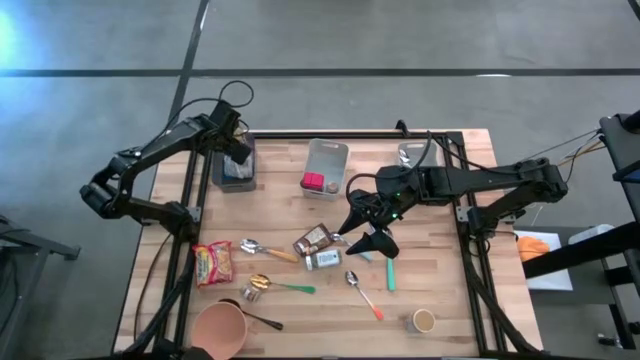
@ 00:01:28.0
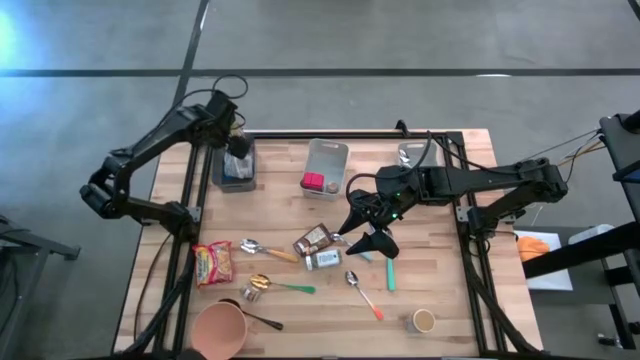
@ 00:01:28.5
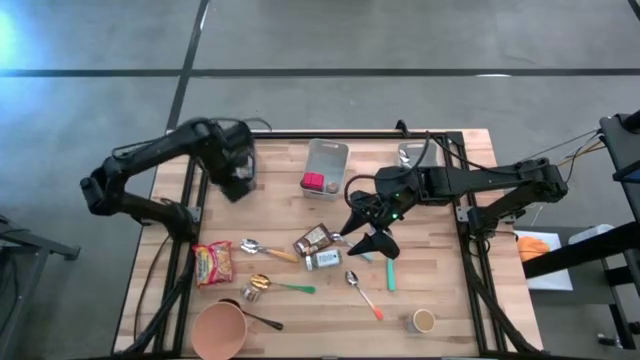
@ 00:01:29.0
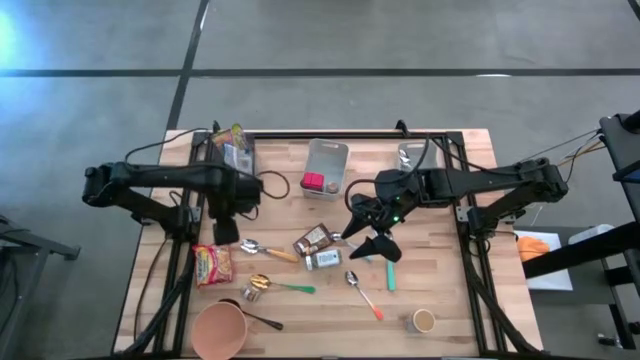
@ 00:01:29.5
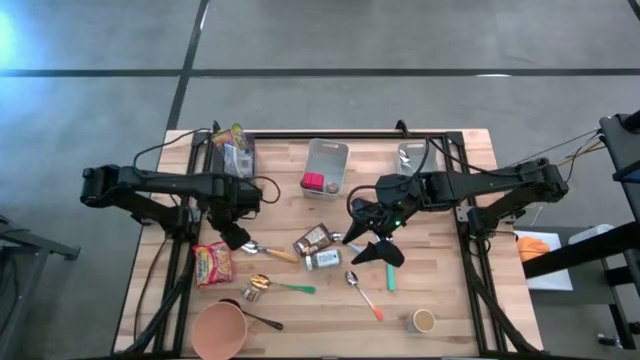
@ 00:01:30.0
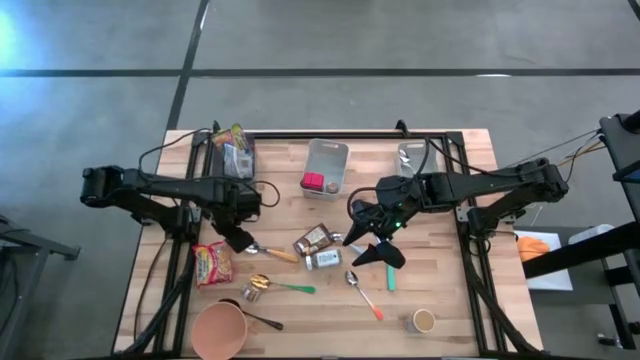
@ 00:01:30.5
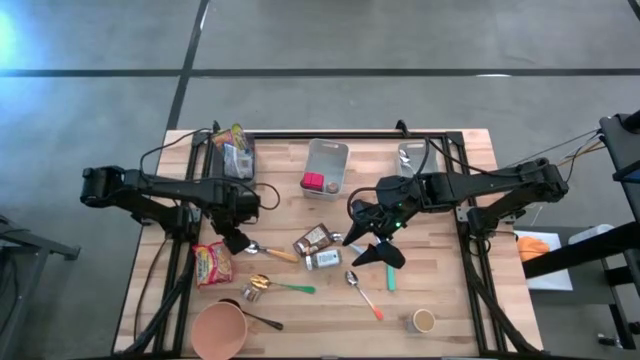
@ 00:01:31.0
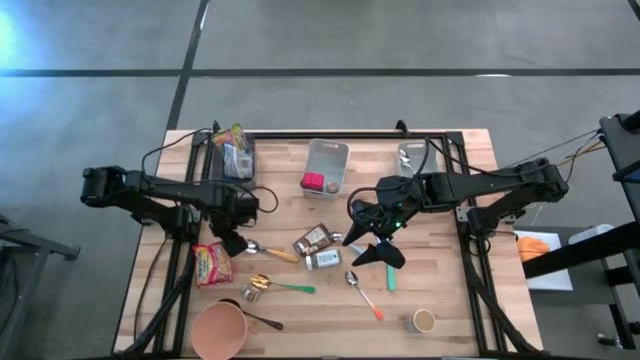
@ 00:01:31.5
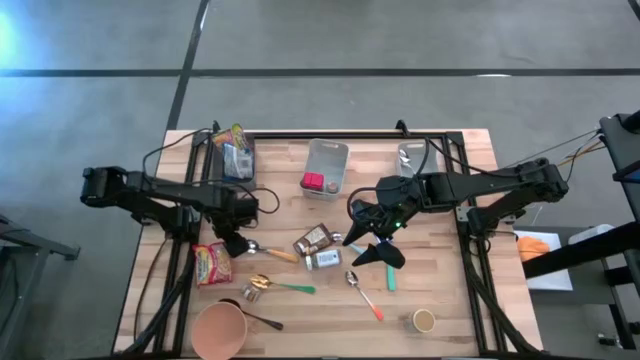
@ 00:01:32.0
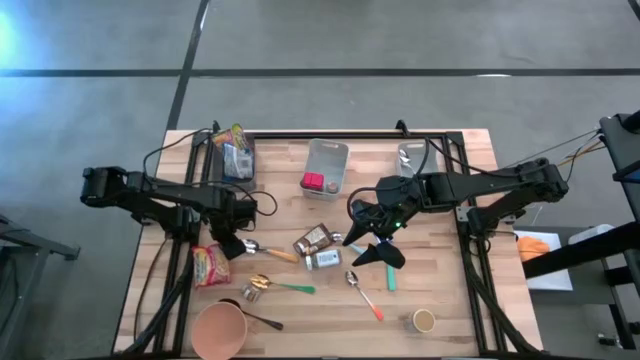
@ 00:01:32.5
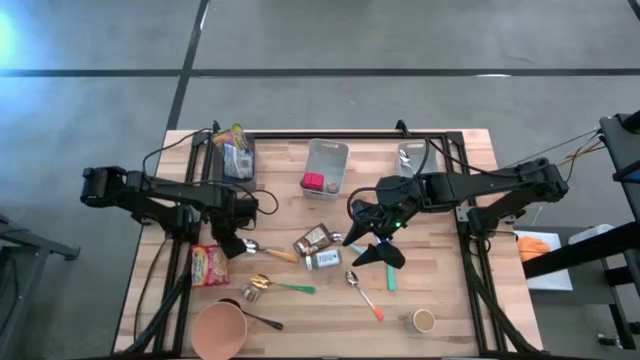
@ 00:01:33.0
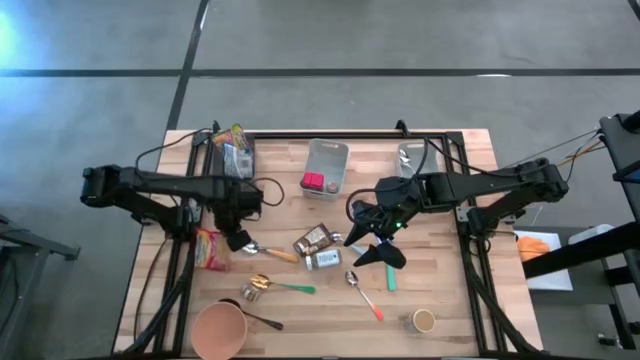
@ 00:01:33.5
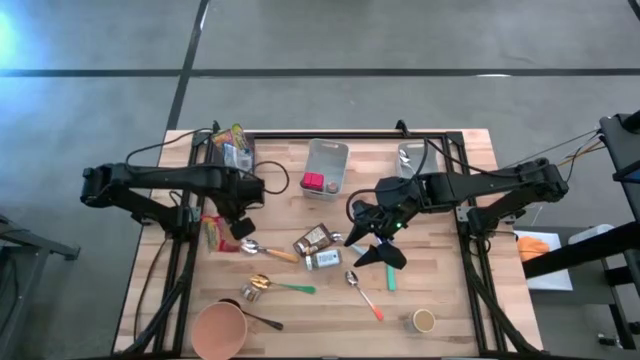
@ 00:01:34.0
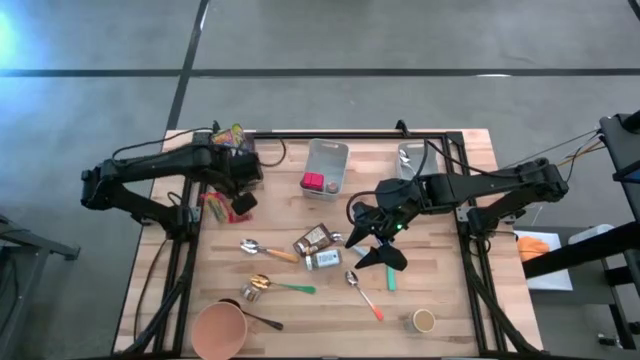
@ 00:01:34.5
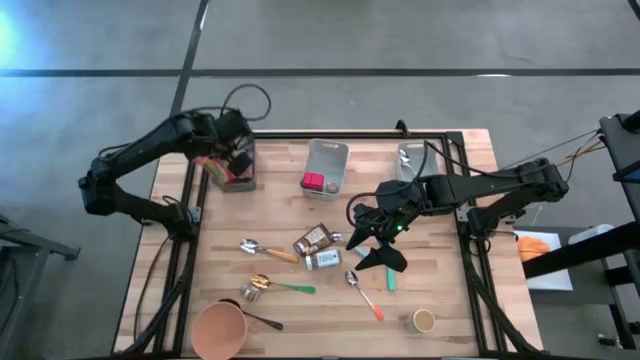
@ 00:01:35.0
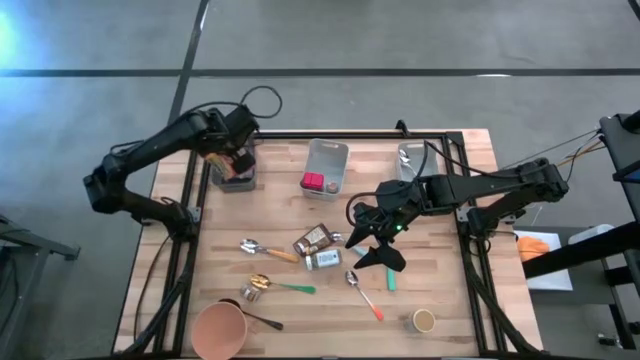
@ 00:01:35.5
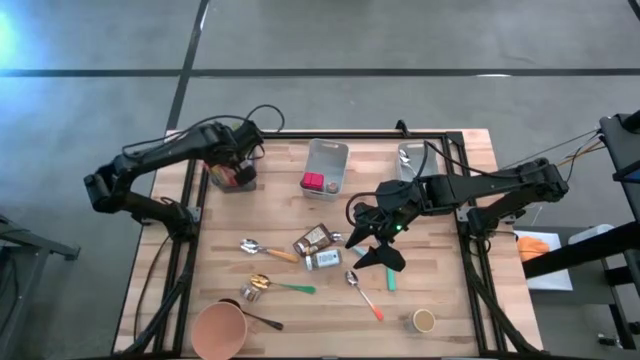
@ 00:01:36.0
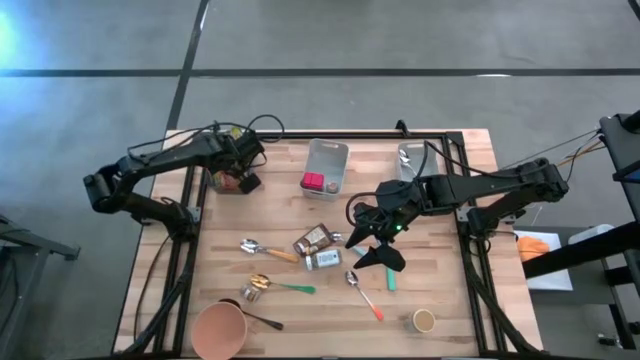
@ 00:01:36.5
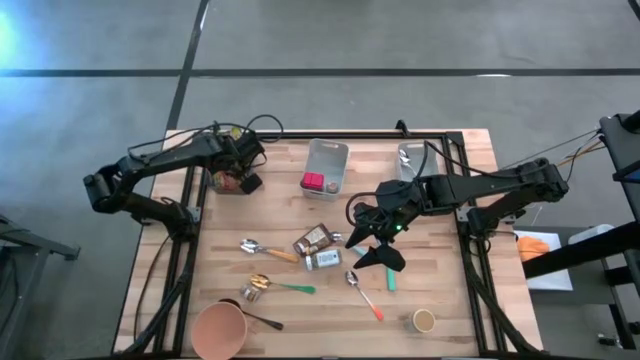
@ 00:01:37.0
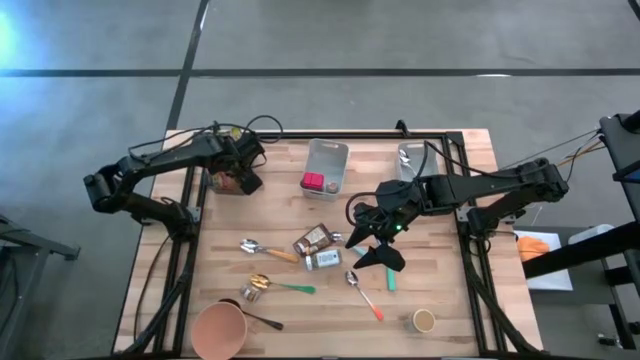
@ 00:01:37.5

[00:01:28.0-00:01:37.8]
Put the red noodle pack into the black bin

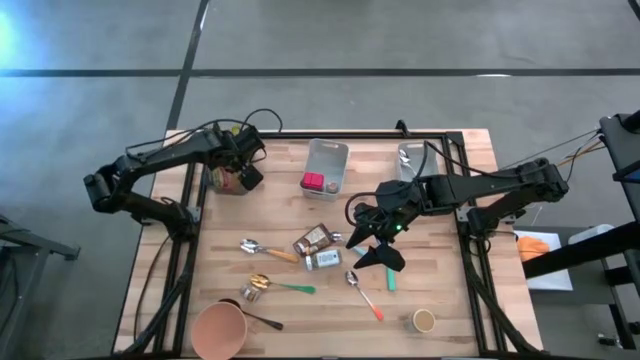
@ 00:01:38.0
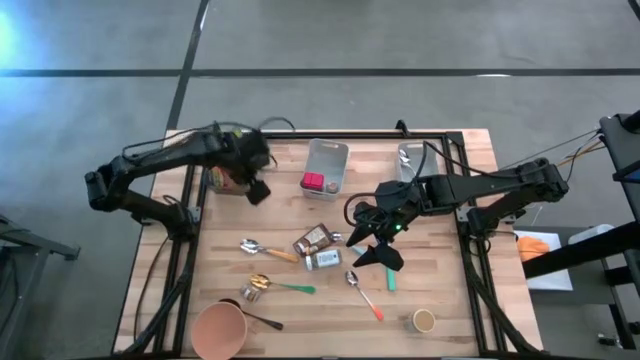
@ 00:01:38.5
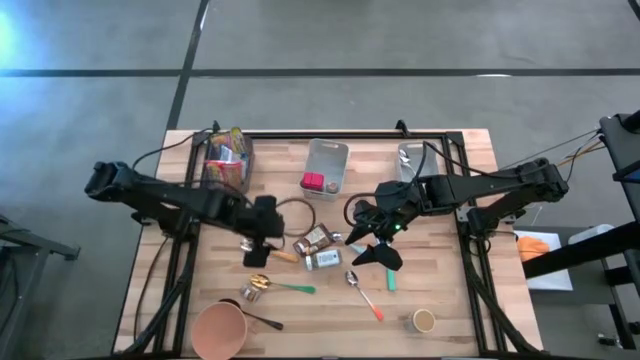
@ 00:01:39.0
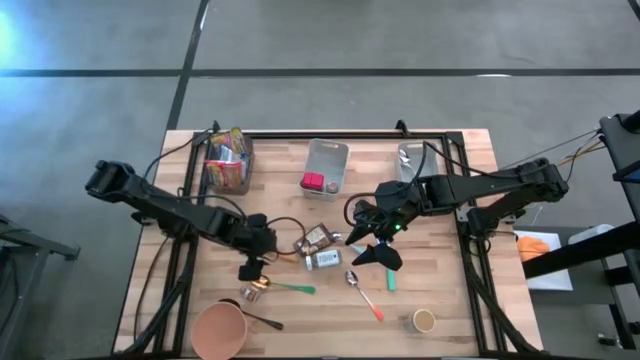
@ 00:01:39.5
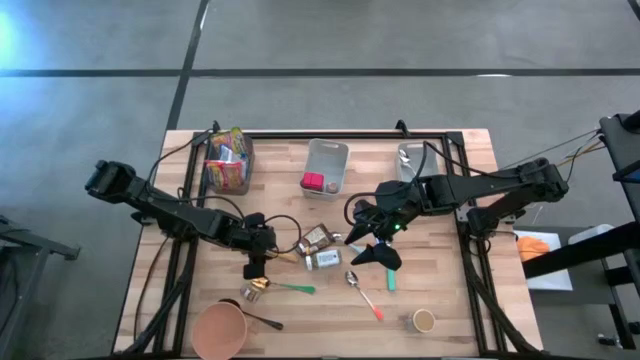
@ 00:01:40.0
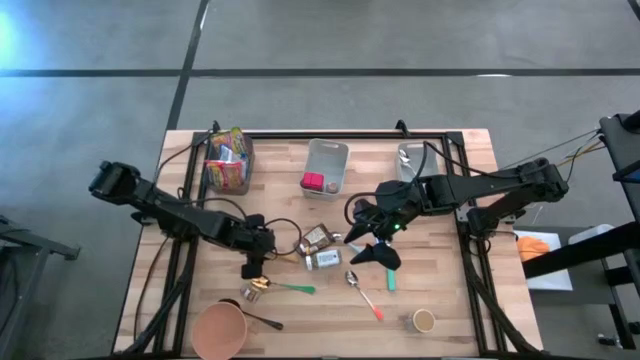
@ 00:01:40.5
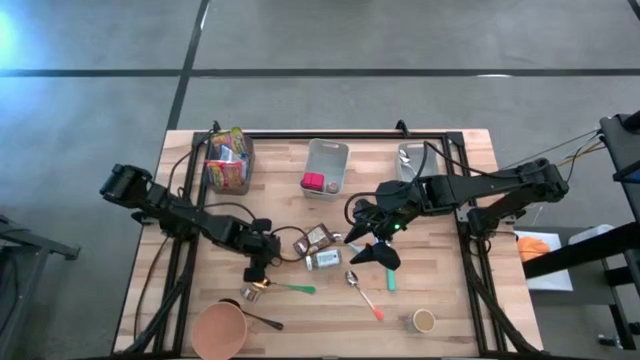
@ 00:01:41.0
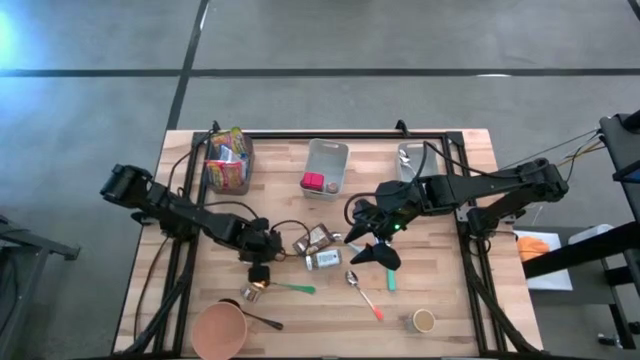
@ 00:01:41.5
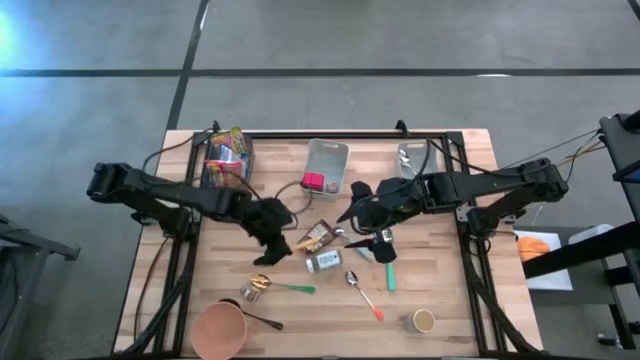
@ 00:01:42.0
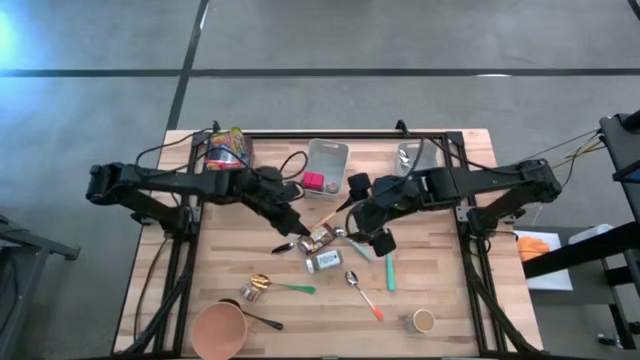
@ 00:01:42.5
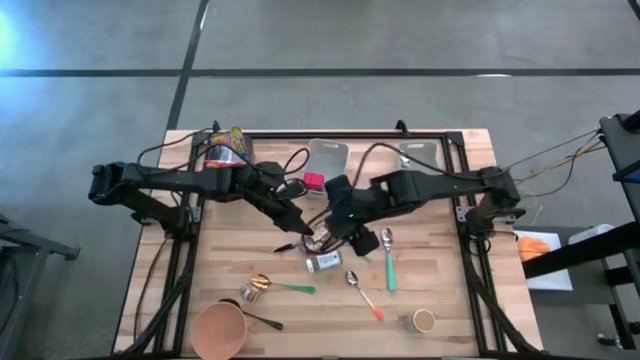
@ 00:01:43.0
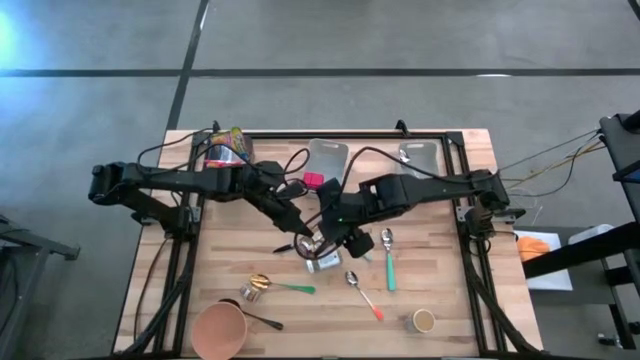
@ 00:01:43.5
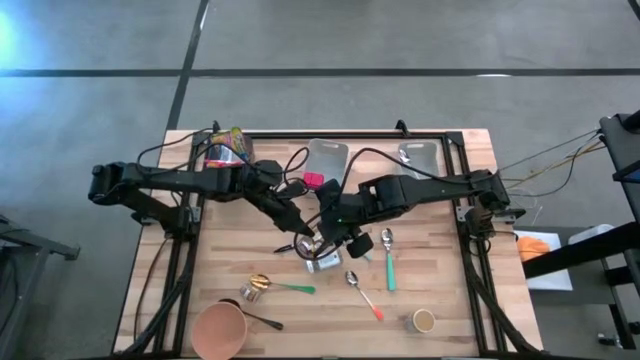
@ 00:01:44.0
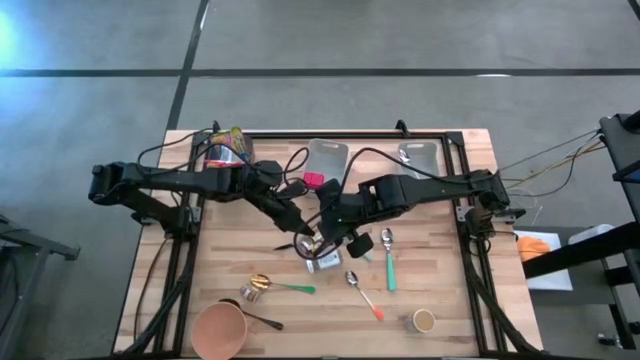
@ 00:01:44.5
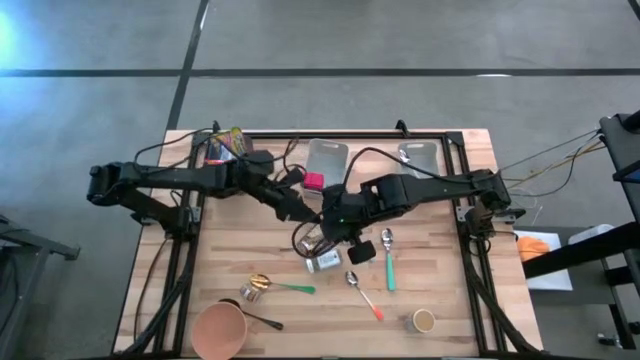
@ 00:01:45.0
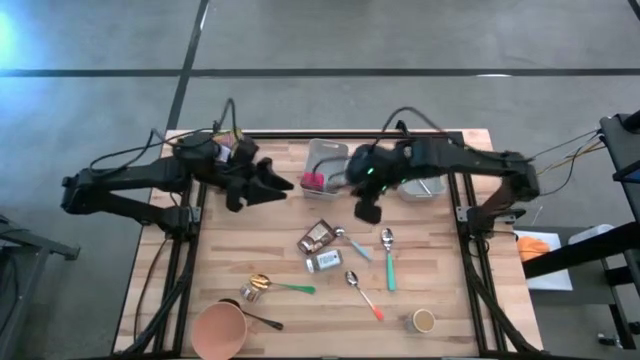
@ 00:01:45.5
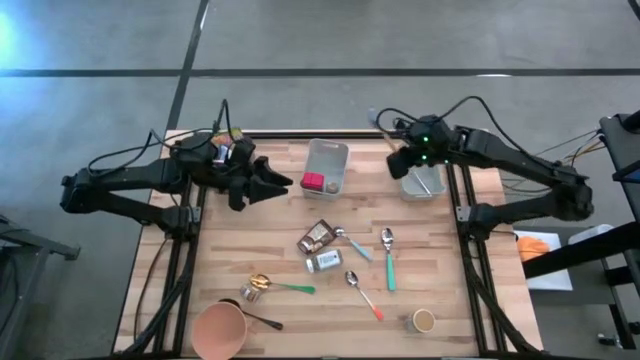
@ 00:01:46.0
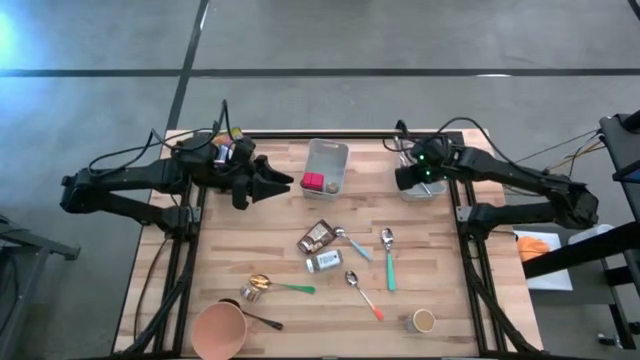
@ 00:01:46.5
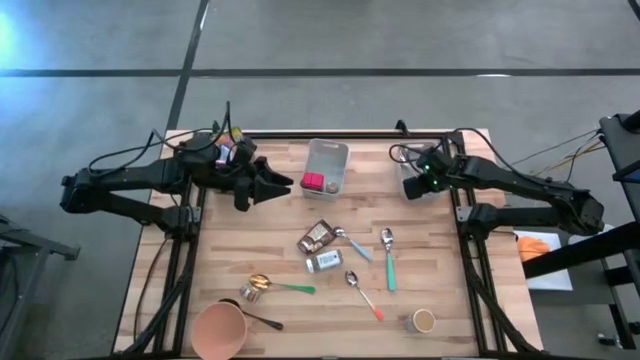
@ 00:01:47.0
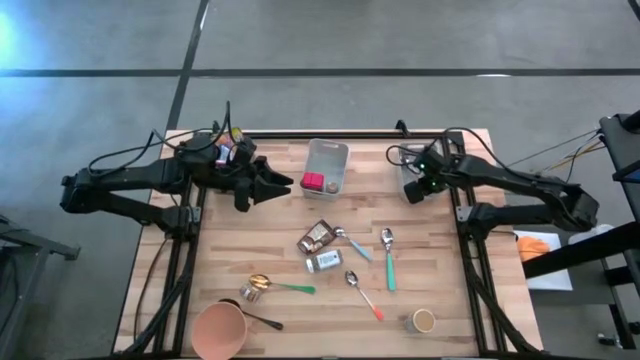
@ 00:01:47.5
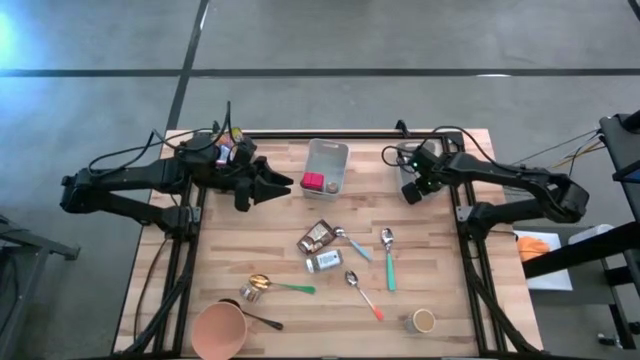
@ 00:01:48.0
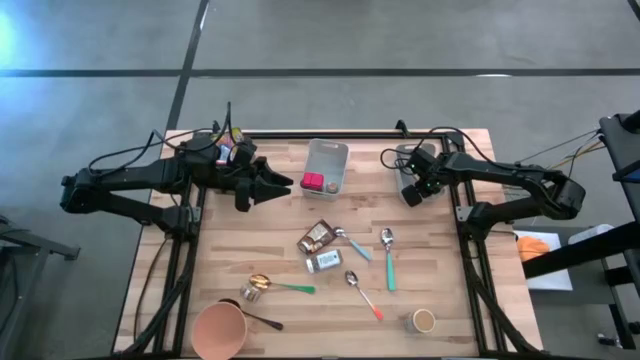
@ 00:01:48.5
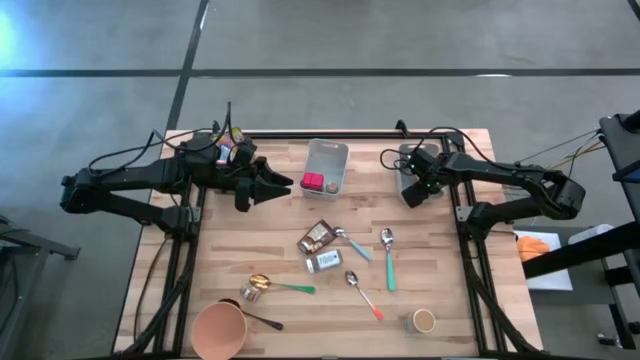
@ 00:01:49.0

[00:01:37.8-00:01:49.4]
Put the yellow spoon into the right gray bin
